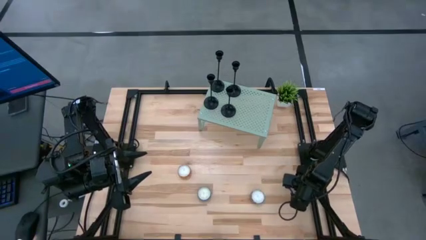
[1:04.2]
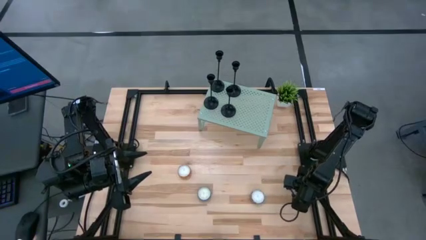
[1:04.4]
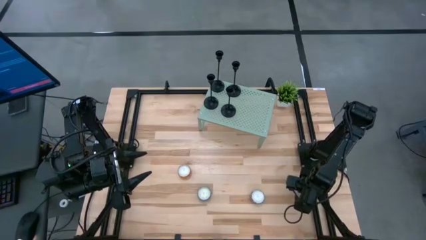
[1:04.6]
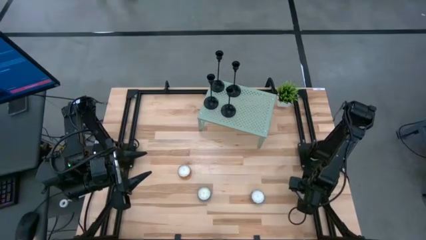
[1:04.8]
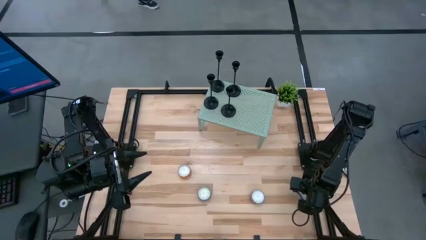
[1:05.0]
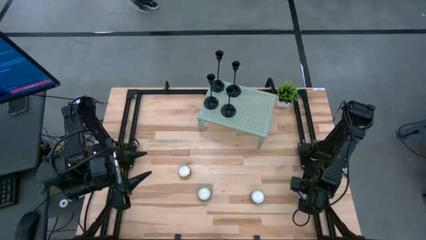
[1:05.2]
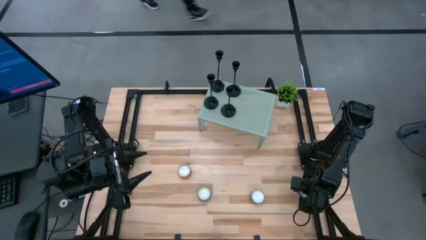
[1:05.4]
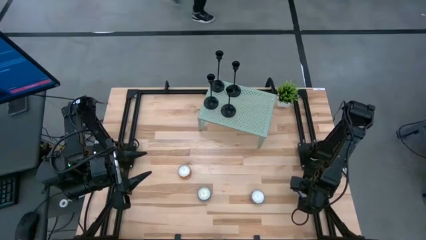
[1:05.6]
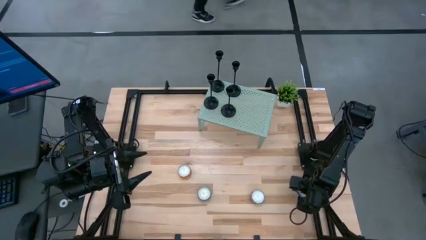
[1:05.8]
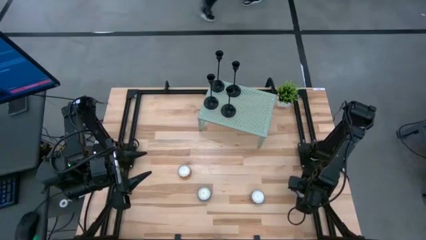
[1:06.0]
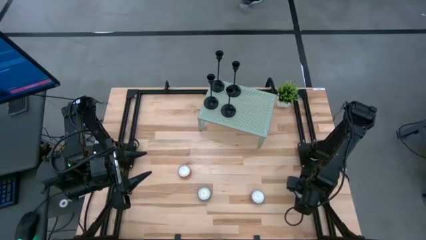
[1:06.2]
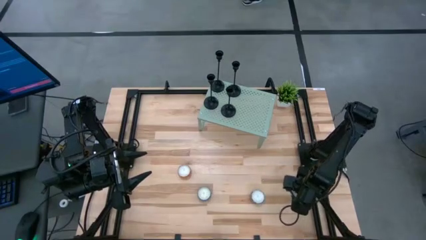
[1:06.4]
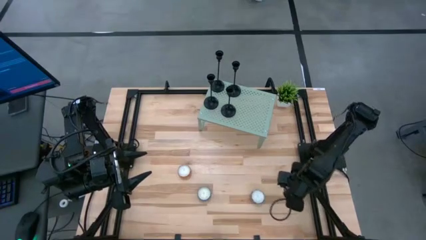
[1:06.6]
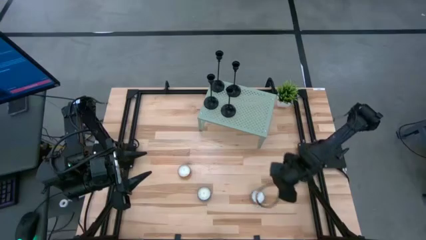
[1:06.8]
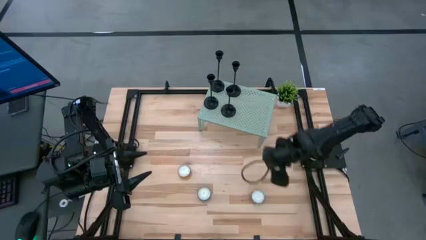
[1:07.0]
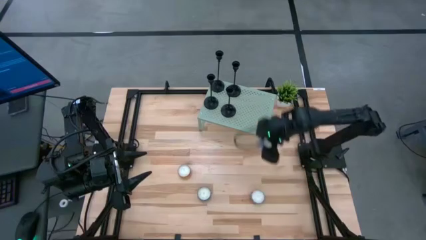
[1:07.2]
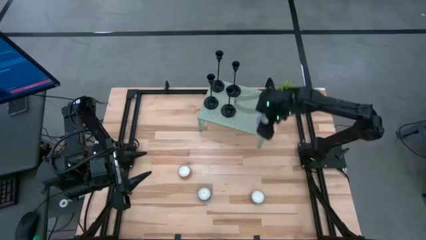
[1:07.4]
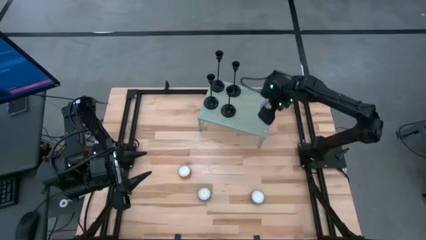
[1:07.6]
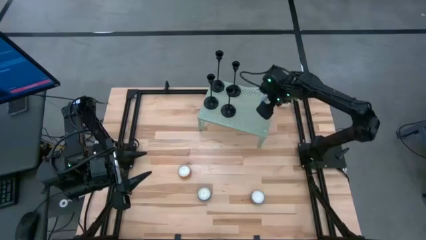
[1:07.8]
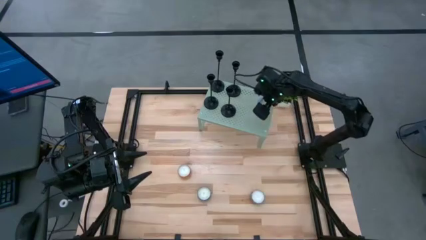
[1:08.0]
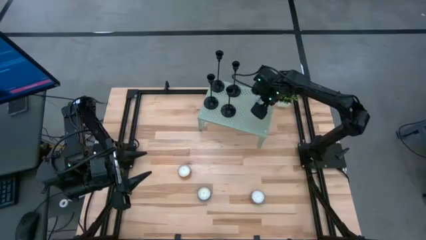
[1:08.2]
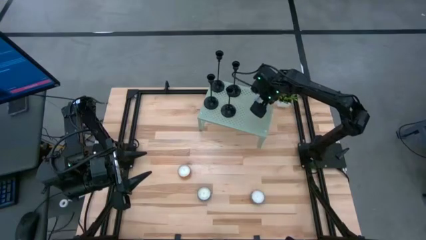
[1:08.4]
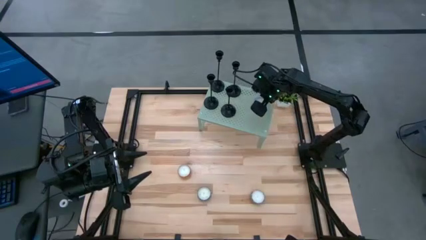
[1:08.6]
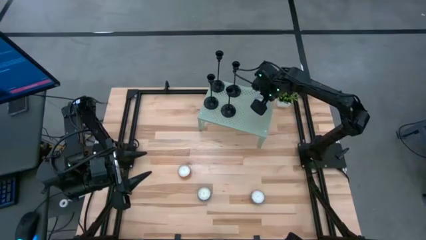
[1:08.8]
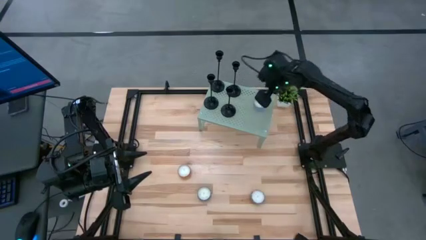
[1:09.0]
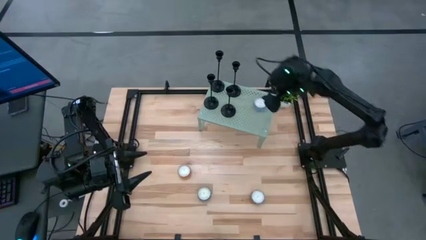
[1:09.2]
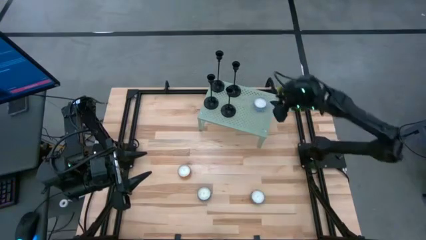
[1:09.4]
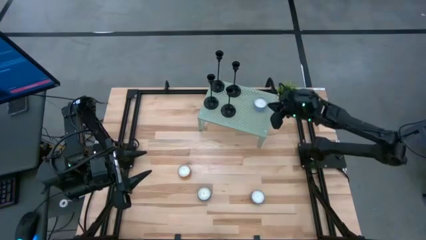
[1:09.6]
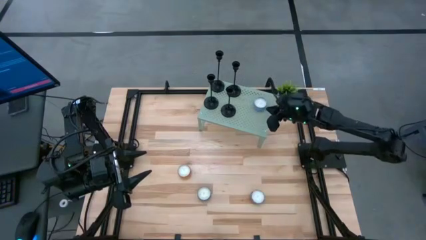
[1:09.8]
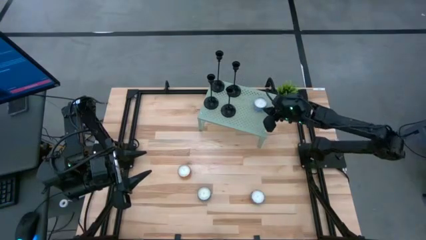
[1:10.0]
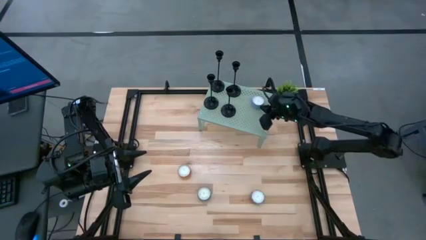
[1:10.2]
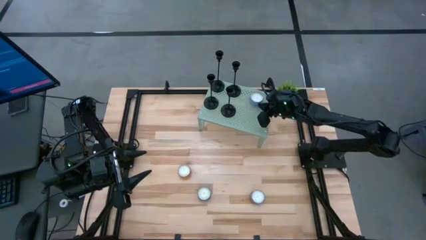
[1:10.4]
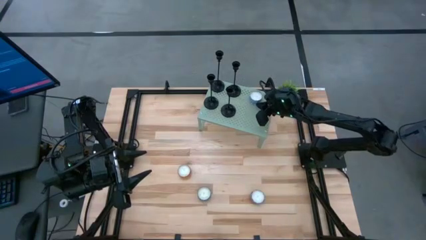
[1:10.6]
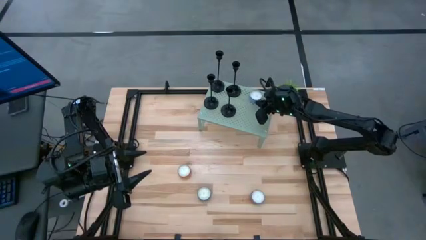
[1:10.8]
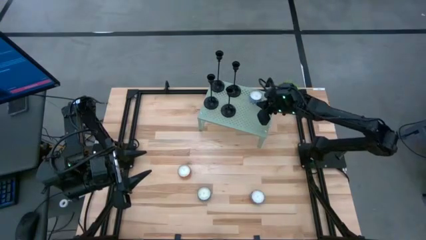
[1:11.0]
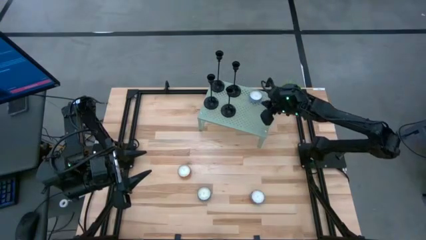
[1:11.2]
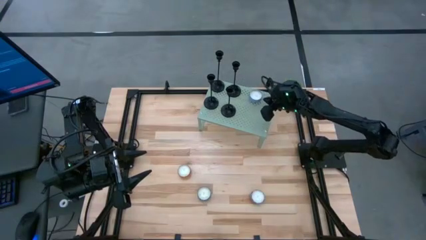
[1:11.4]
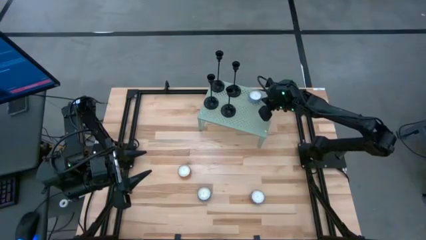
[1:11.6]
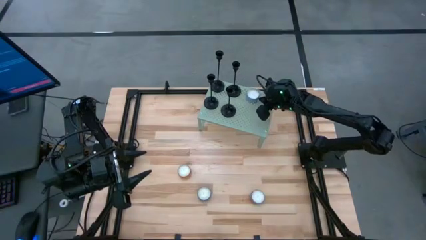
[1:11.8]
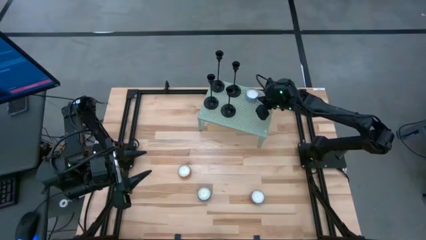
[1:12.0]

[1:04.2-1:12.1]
Task: Pick & Place candle stick holders
Put the light blue scented candle on the shelf

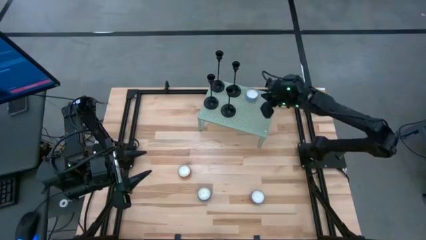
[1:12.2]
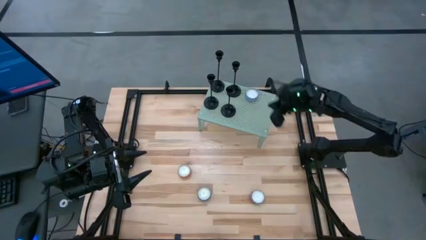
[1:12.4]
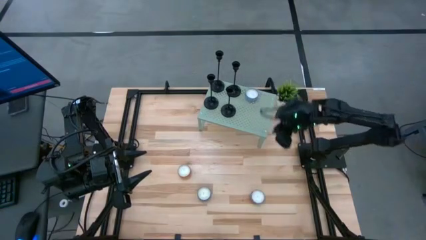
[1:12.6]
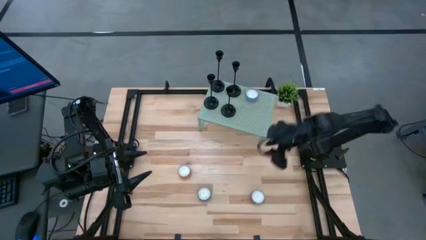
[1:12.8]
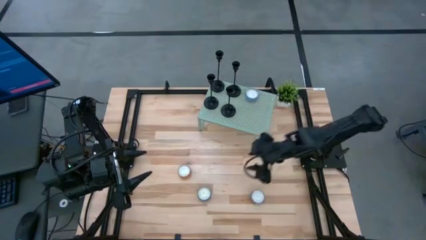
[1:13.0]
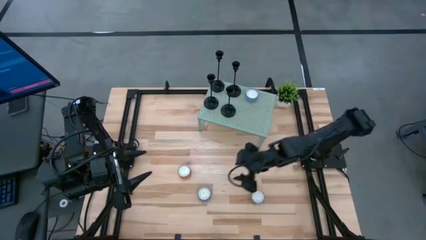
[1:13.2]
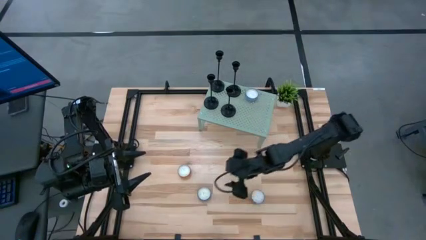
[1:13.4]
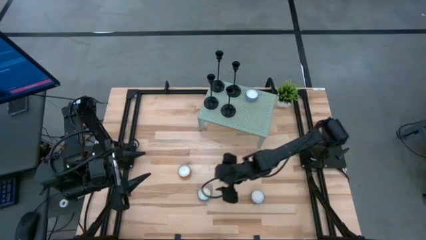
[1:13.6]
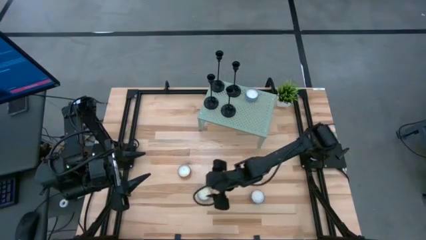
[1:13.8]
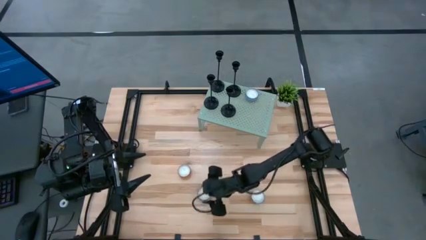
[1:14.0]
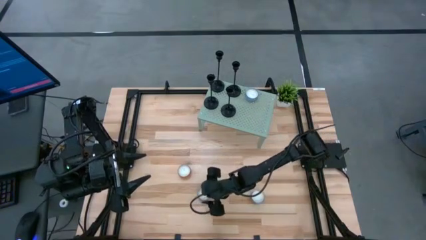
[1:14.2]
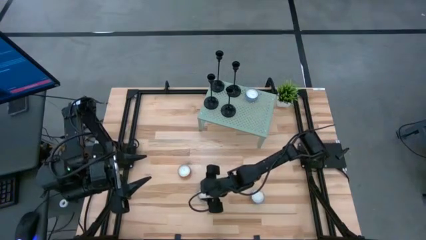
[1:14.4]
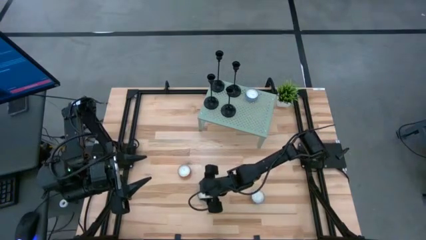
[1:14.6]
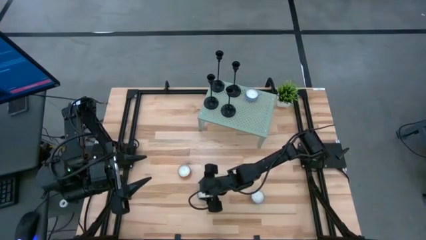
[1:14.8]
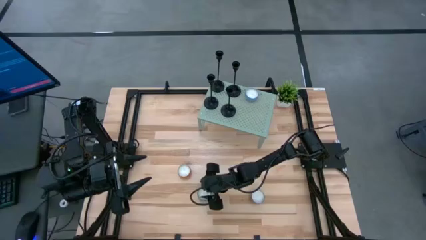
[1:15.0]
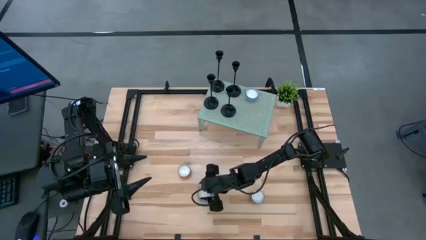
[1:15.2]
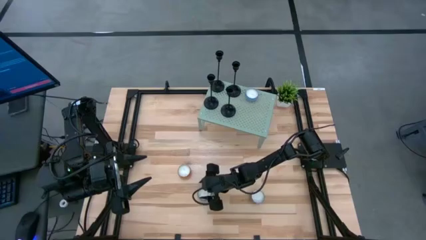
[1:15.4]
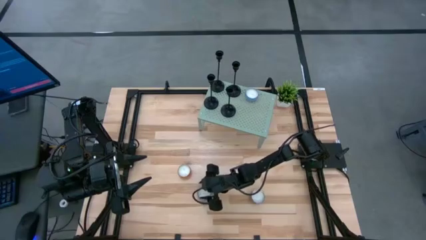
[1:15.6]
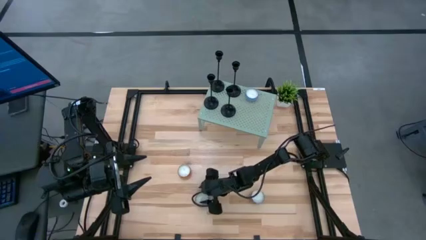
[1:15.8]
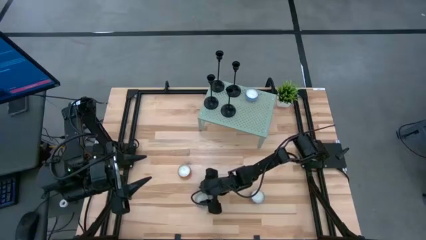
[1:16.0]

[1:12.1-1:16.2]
Put the blue scented candle on the shelf

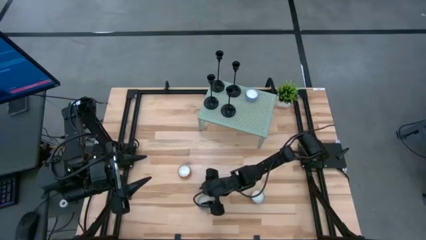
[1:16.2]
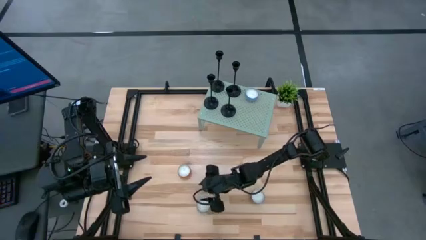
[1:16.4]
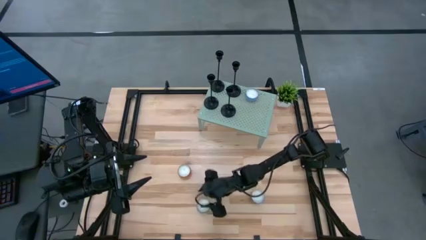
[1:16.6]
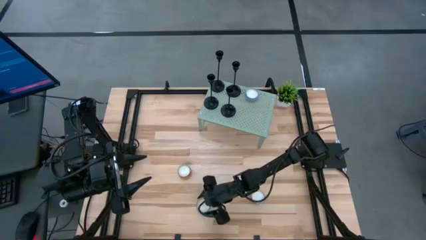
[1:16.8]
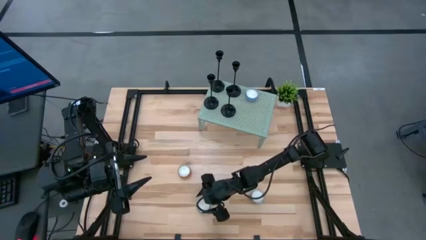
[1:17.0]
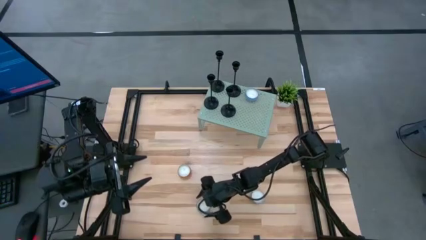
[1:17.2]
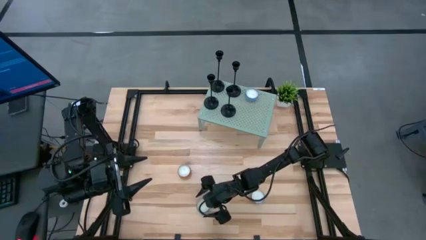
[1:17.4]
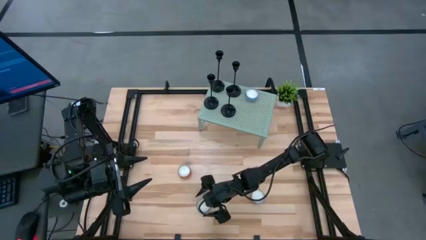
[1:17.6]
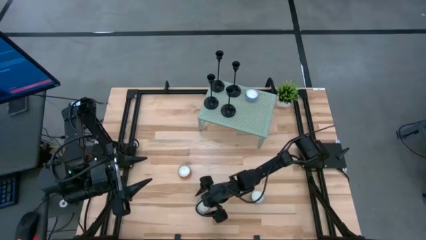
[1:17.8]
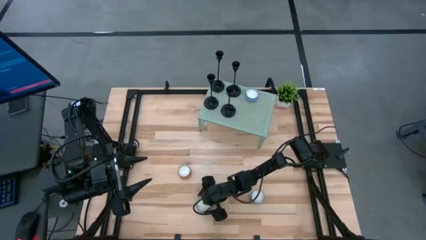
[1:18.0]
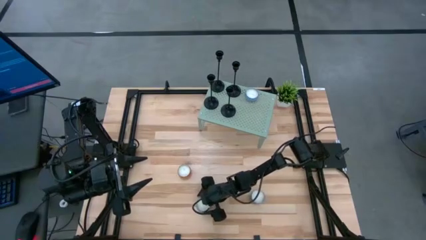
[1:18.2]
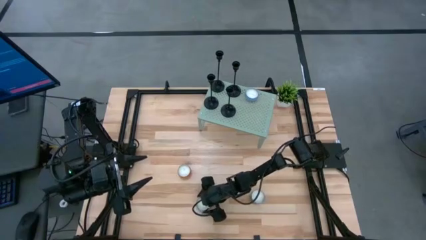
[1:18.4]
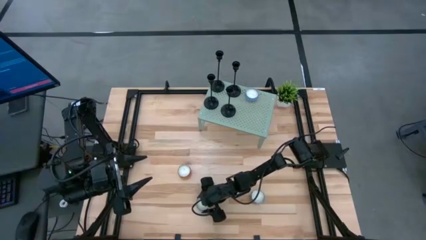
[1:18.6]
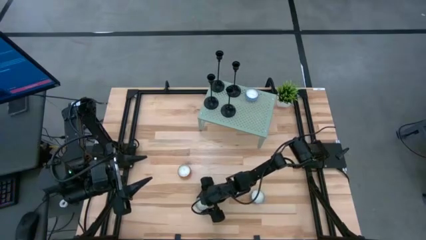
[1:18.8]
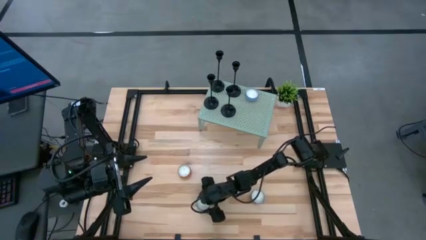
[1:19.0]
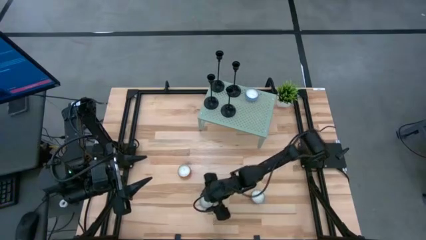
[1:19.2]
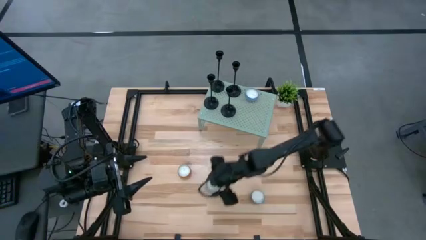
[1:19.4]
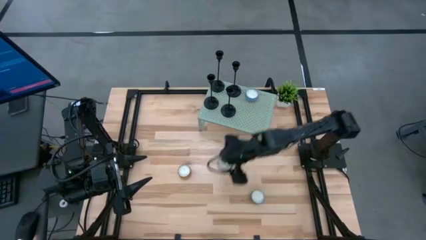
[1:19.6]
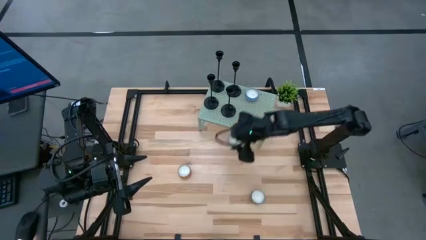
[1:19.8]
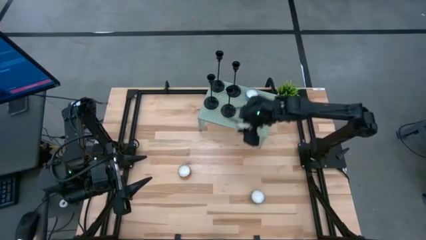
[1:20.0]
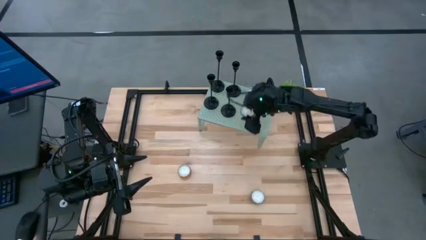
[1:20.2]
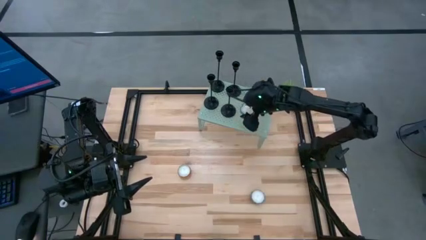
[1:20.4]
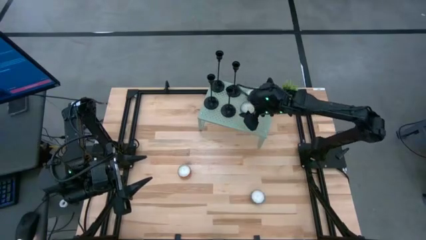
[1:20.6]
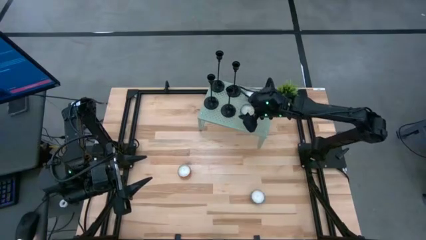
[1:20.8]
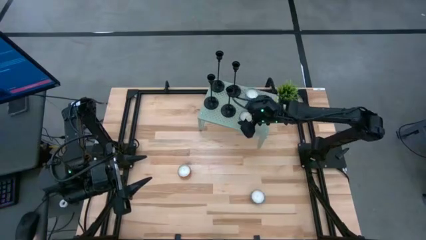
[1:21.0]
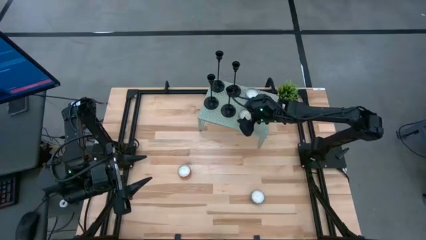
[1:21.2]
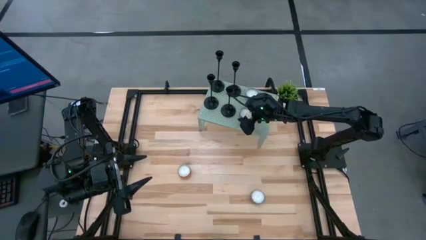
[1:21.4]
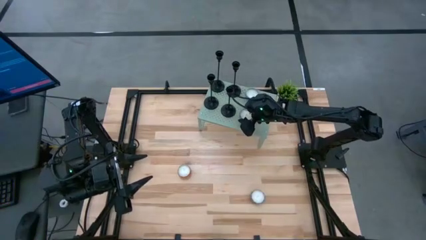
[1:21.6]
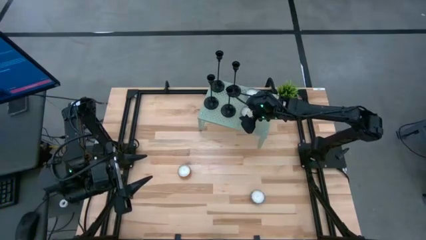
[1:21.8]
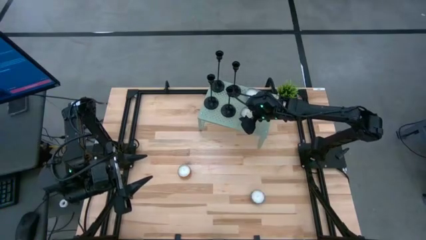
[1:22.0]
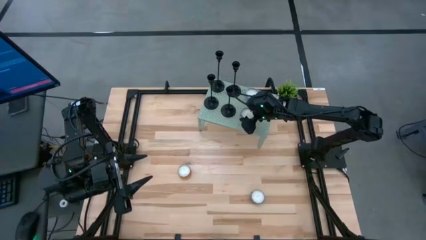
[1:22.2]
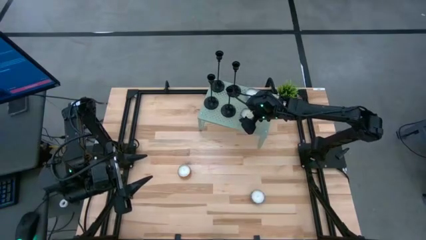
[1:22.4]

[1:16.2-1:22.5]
Put the blue scented candle on the shelf
